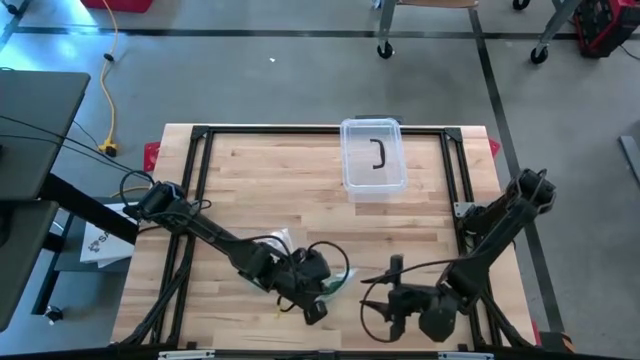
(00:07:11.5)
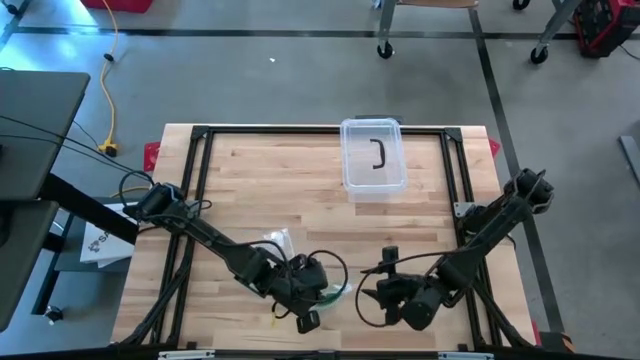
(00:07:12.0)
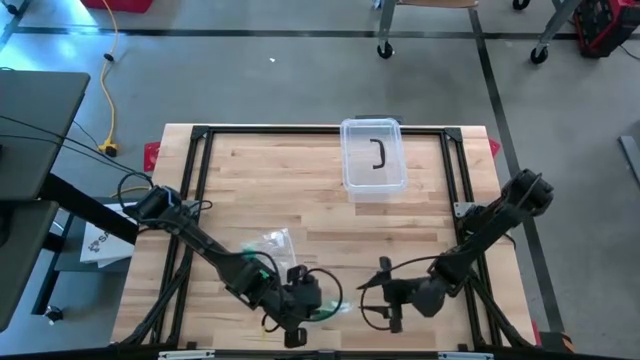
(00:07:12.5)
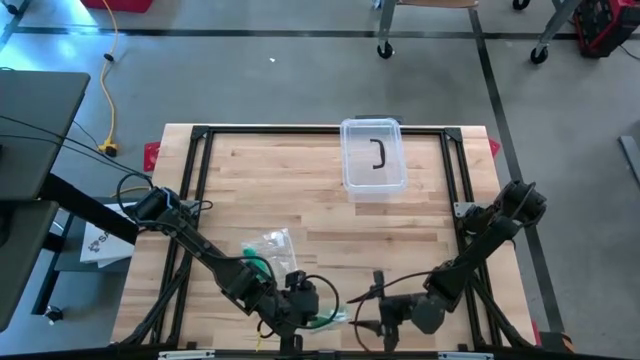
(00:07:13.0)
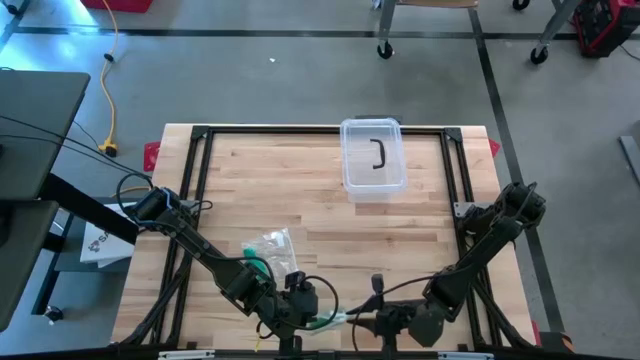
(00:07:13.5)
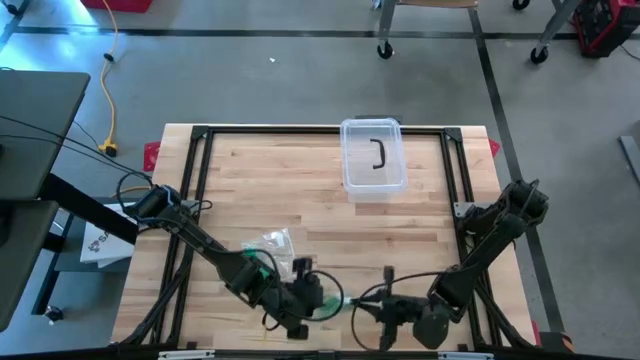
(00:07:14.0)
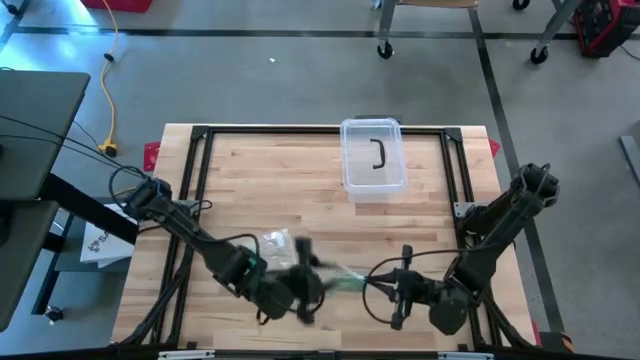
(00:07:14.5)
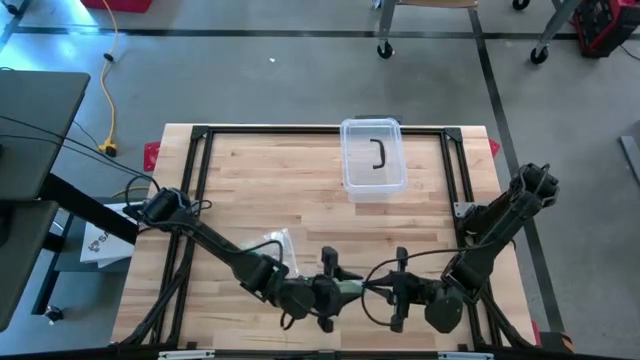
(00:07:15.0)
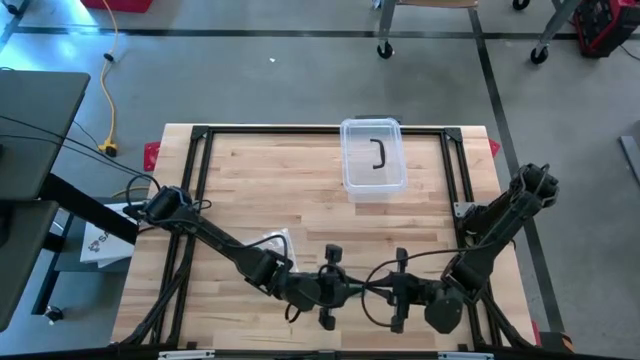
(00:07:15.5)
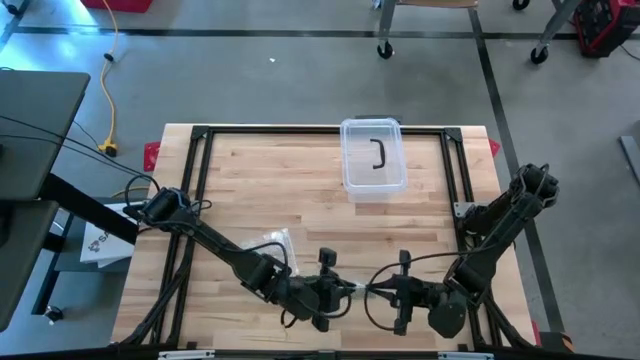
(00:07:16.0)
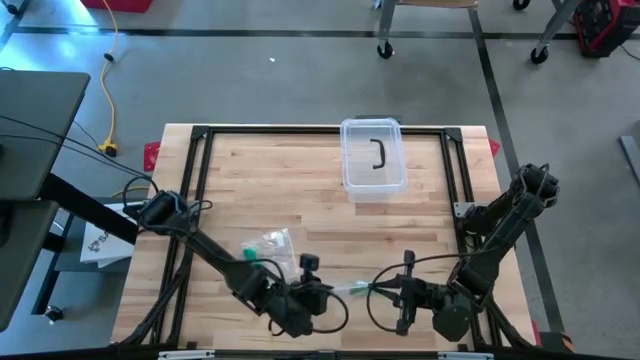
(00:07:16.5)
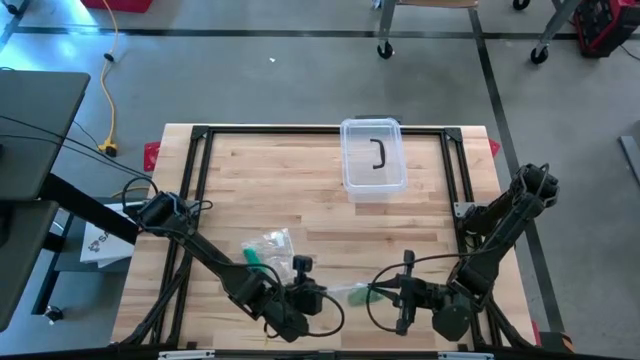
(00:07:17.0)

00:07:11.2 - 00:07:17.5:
Task: Roll bandage
Close the transparent zip bag

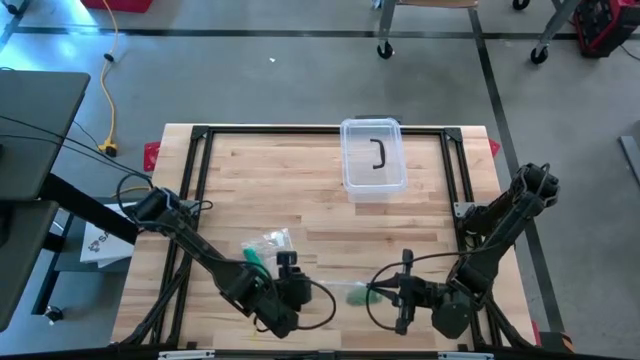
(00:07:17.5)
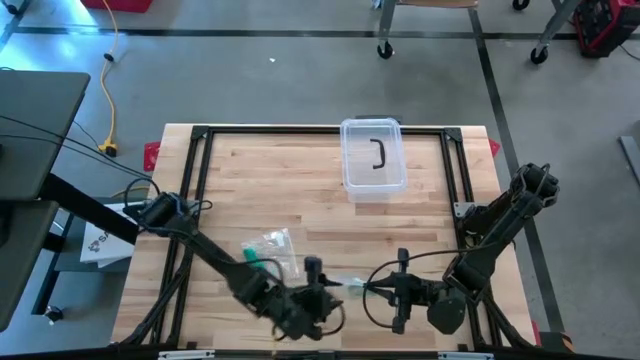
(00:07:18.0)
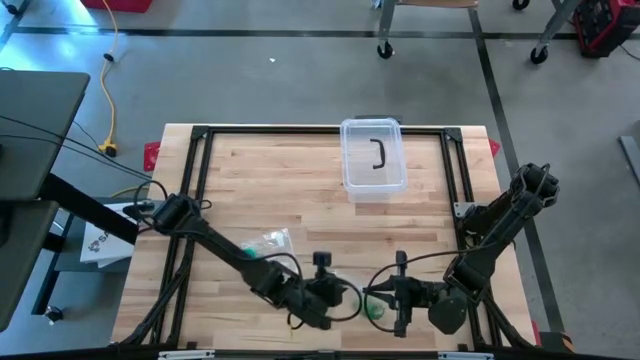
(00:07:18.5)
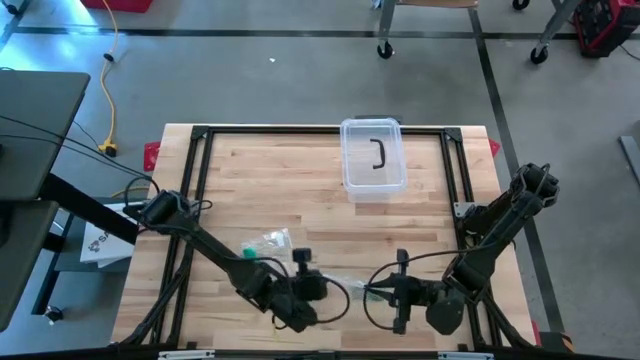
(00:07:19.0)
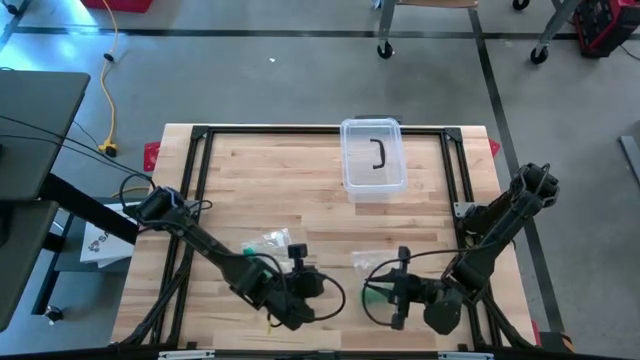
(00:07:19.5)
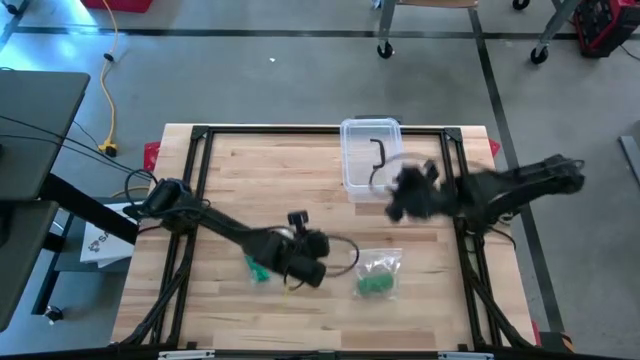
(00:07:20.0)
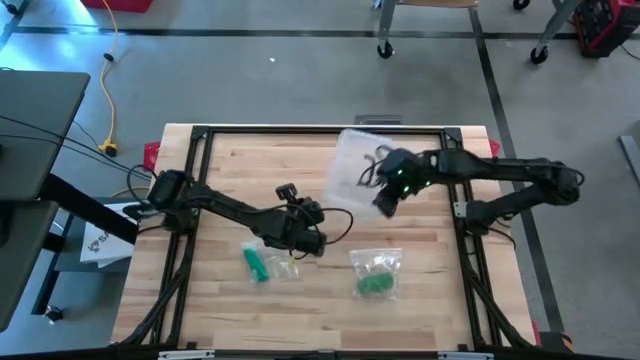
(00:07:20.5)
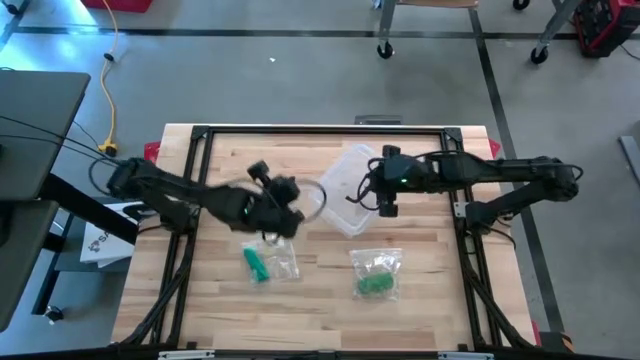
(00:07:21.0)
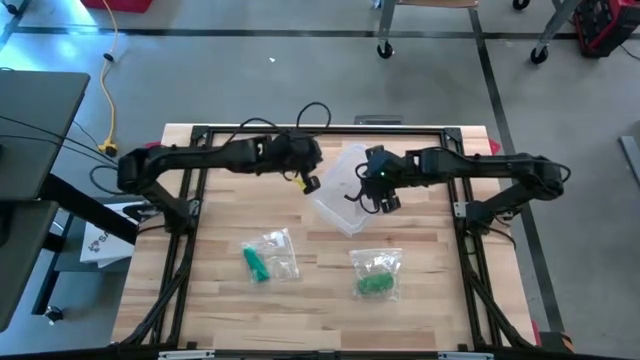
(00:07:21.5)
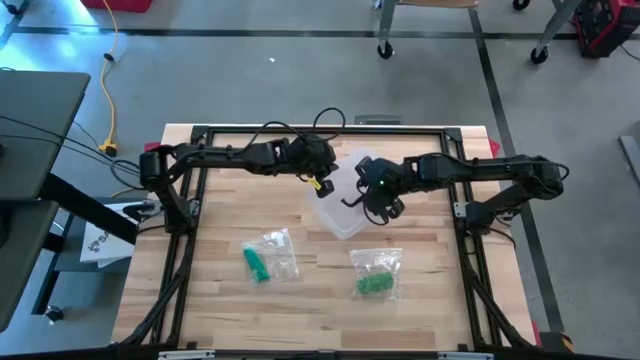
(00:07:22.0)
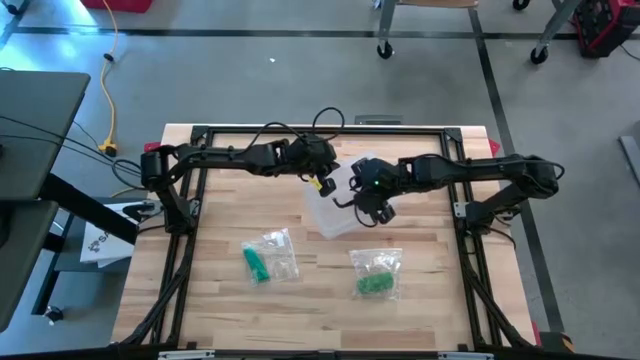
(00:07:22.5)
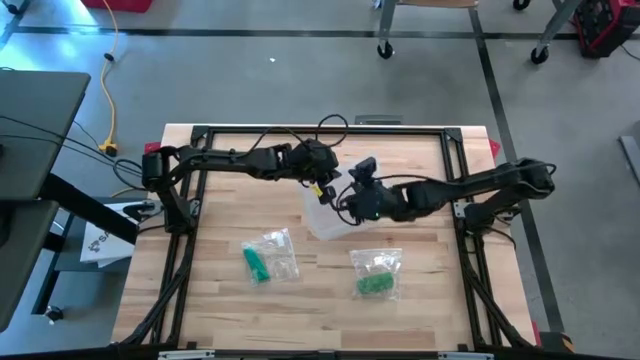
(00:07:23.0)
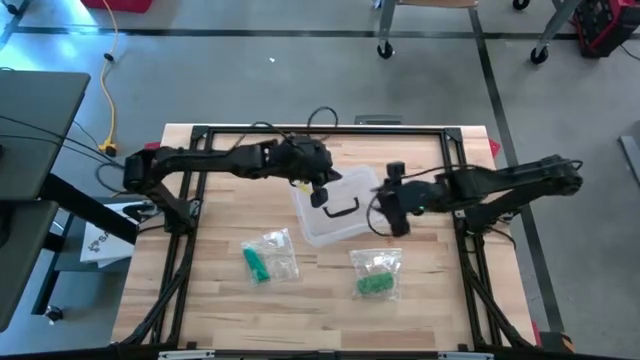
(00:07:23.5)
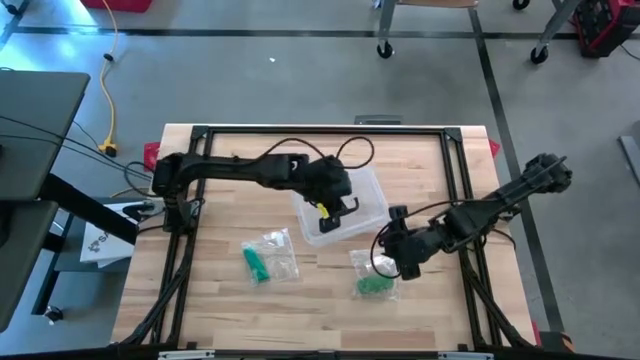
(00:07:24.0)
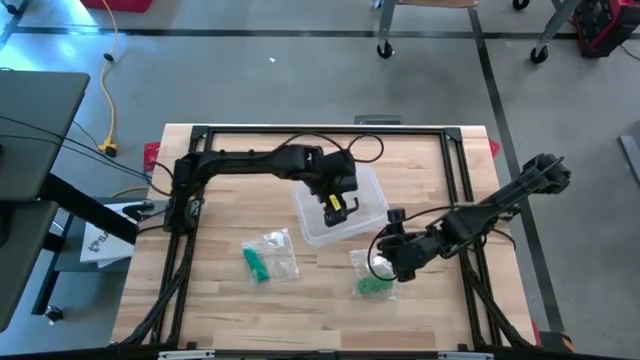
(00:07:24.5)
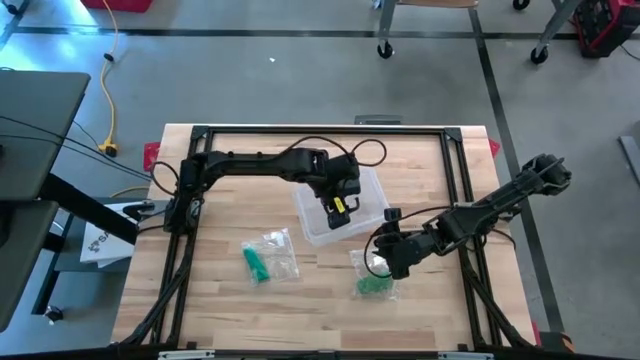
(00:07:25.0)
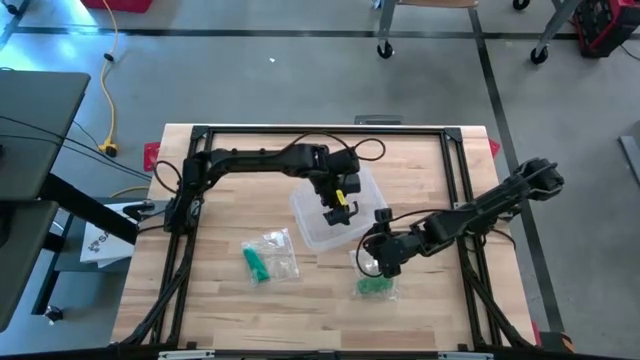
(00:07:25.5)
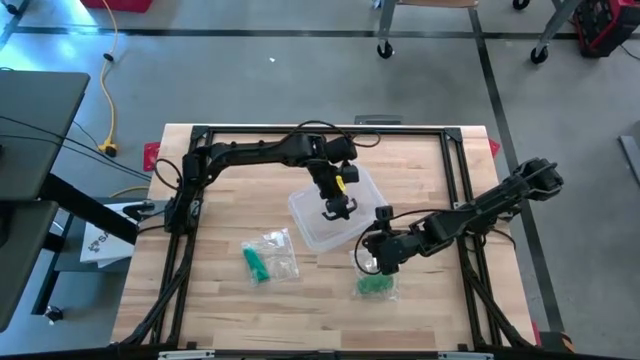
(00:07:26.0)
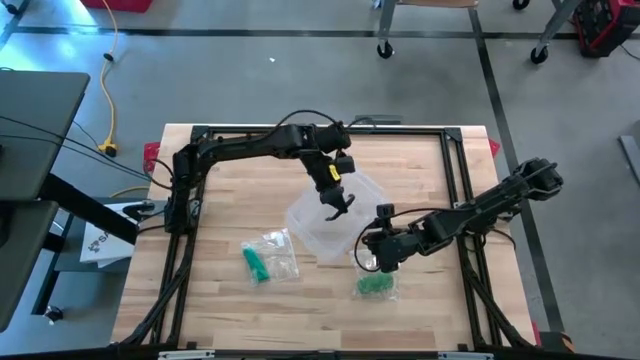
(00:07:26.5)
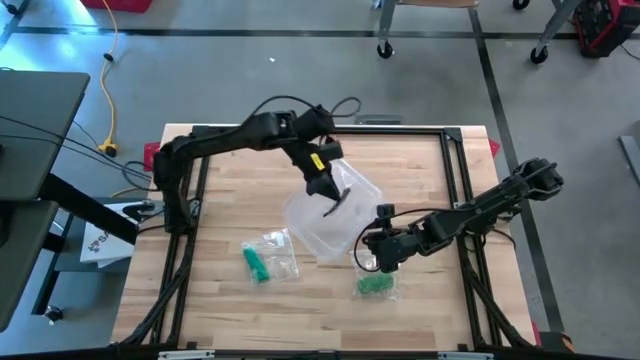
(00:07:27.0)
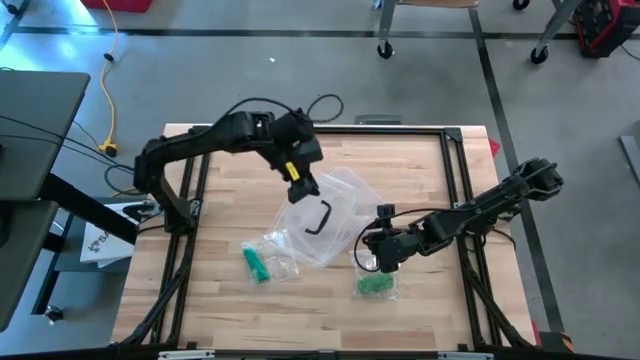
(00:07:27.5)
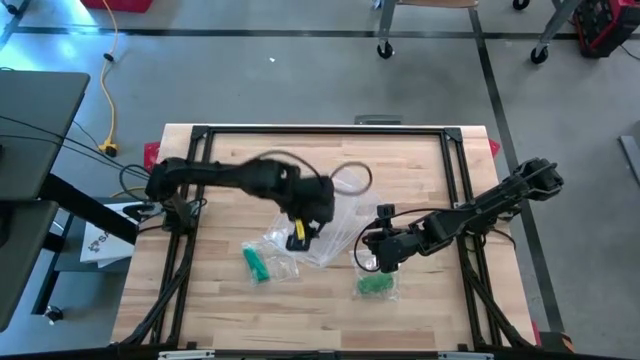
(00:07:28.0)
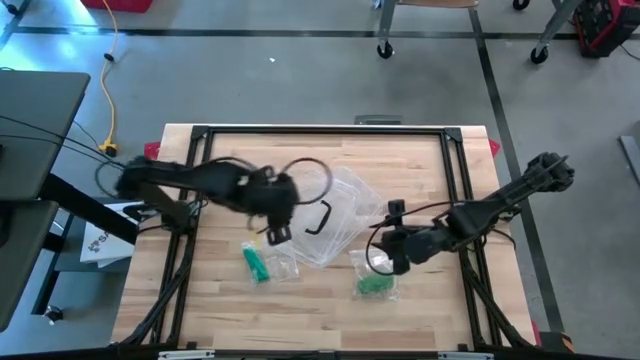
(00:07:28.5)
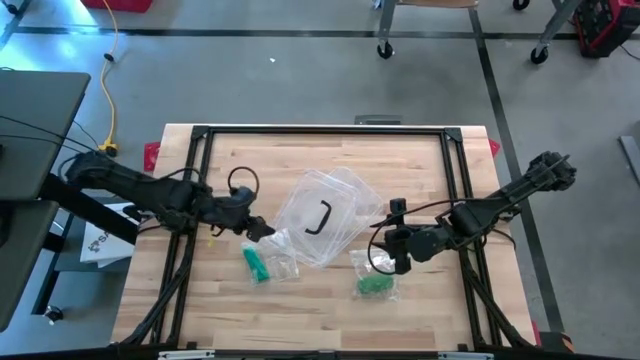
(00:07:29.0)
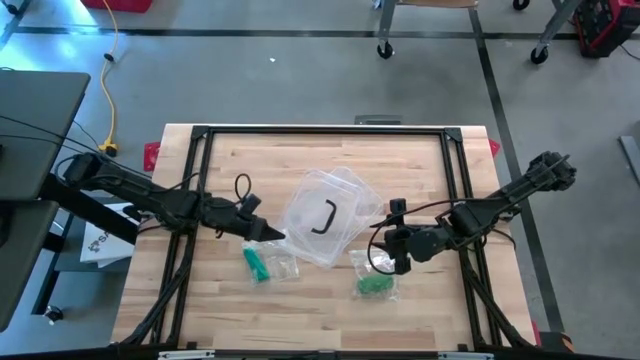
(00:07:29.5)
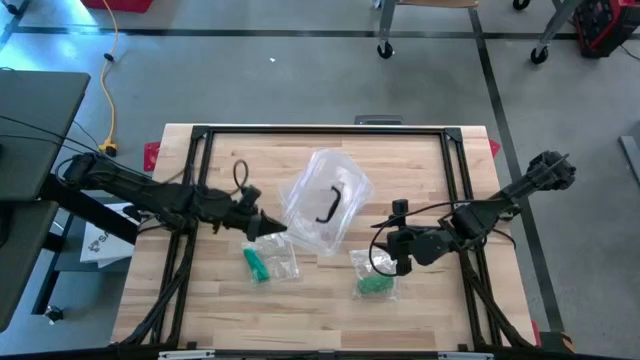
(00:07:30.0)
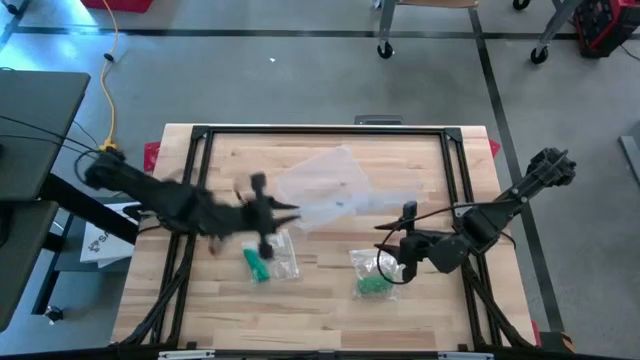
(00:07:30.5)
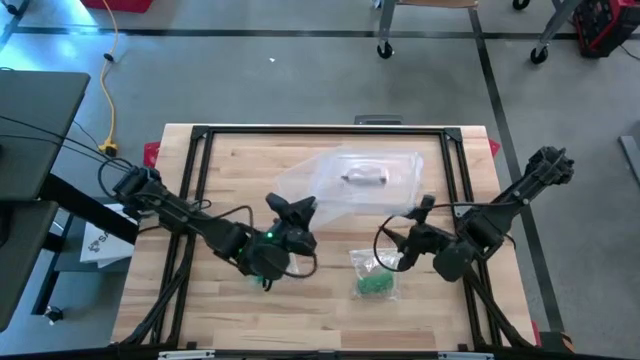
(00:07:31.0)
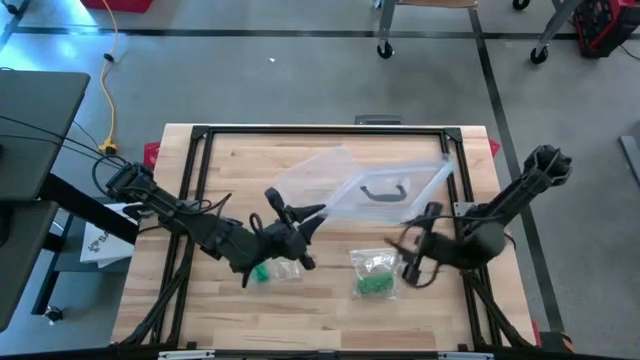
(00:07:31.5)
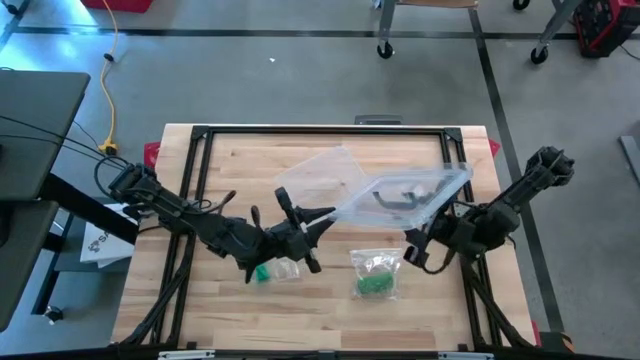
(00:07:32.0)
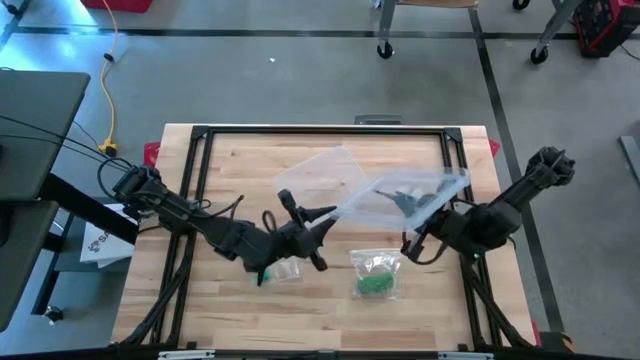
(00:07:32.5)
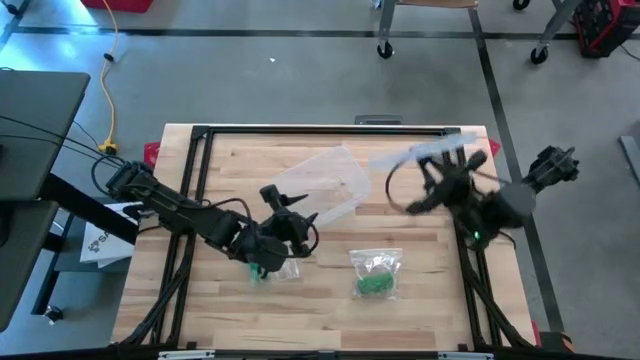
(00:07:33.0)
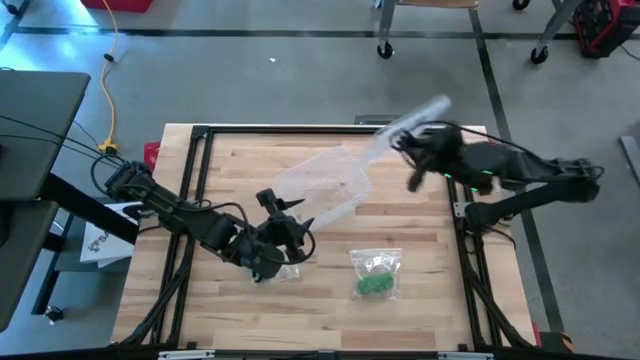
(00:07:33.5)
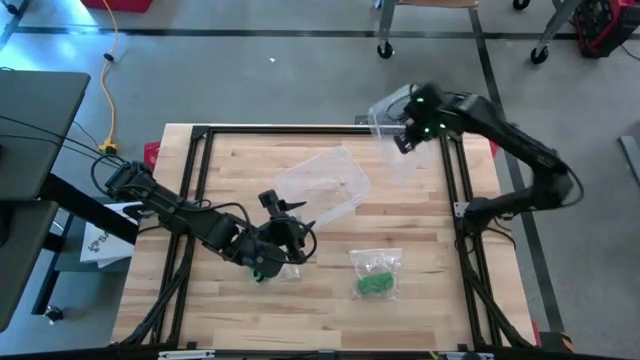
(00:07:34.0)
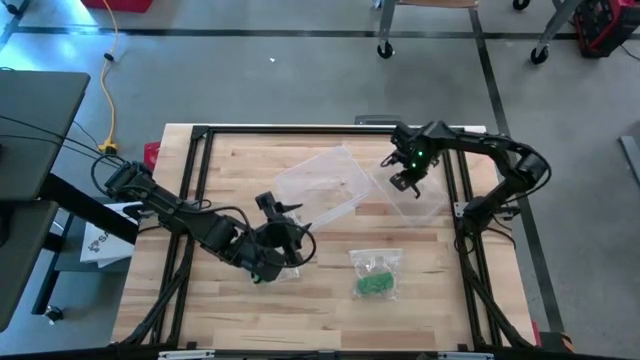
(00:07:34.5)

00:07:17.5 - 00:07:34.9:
Open the transparent bin
